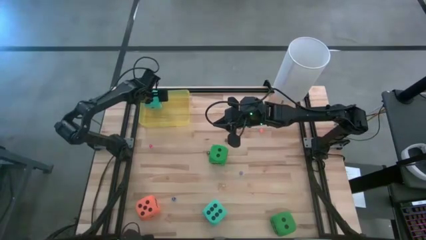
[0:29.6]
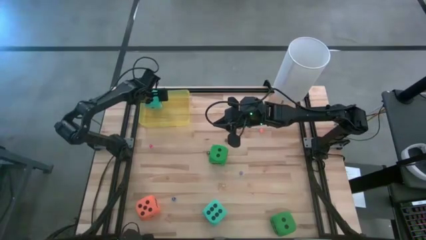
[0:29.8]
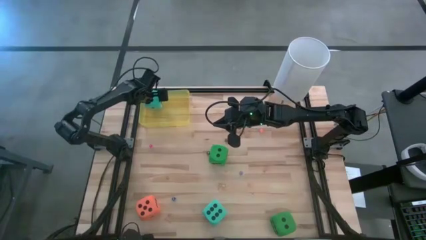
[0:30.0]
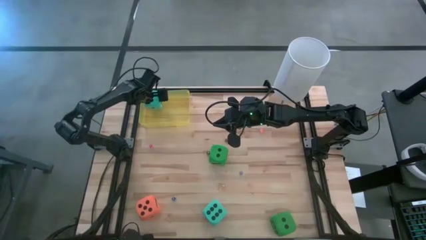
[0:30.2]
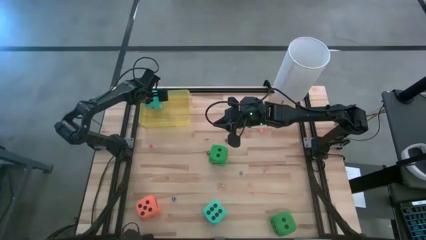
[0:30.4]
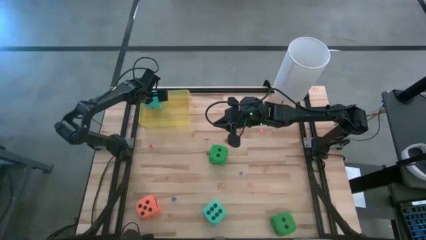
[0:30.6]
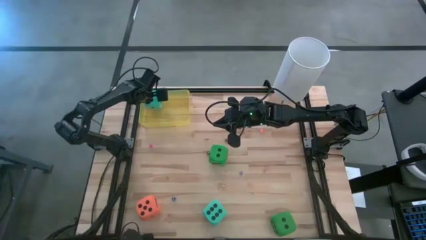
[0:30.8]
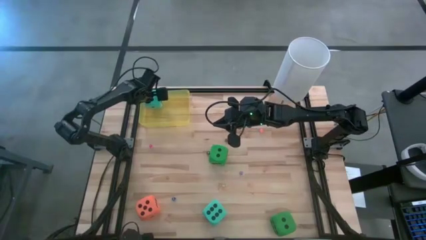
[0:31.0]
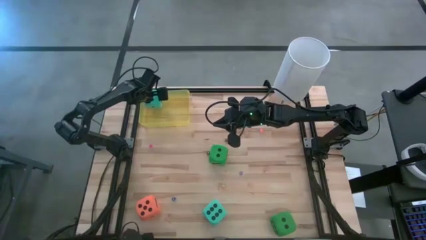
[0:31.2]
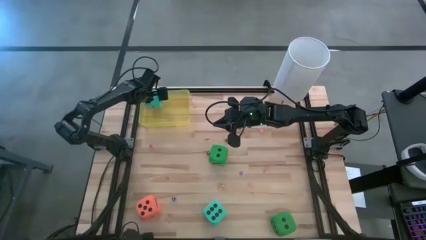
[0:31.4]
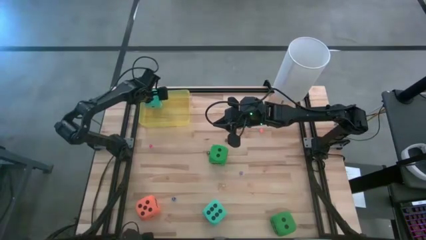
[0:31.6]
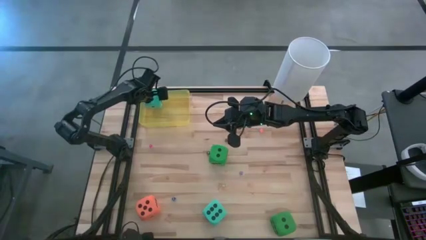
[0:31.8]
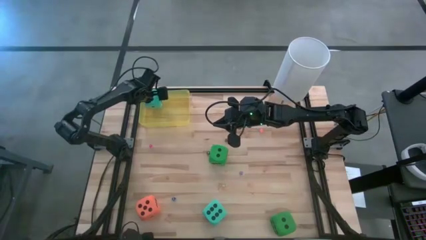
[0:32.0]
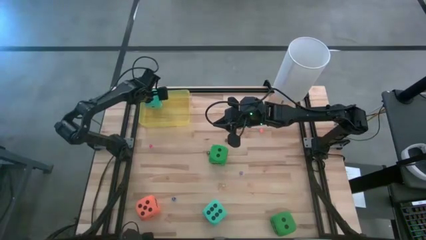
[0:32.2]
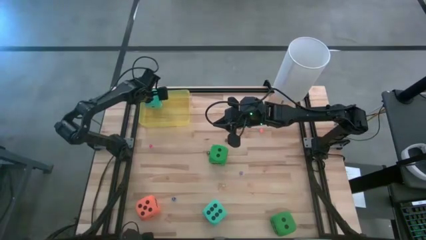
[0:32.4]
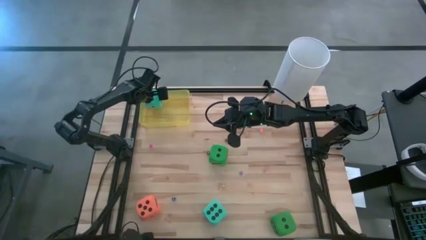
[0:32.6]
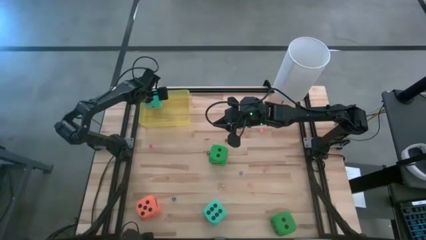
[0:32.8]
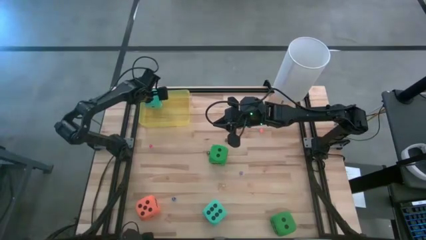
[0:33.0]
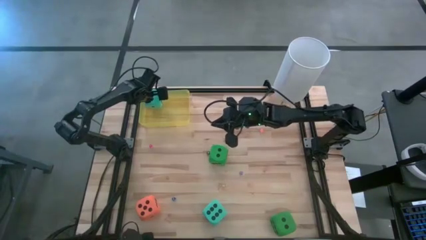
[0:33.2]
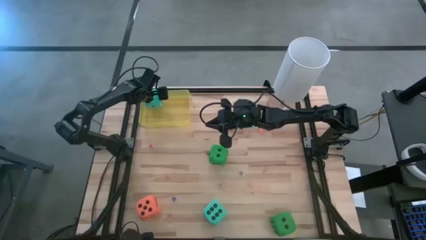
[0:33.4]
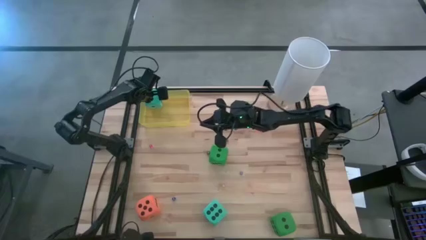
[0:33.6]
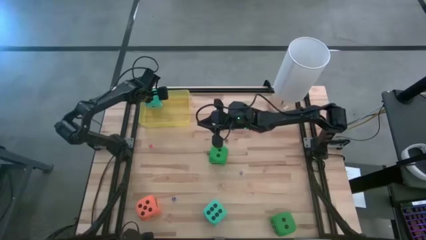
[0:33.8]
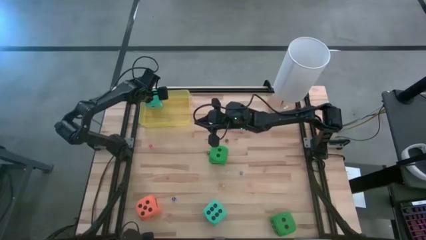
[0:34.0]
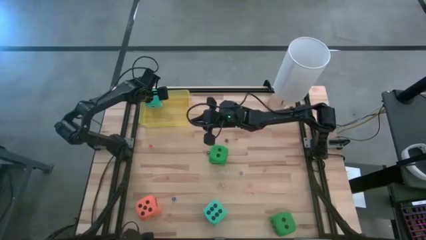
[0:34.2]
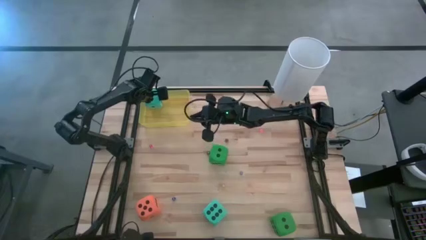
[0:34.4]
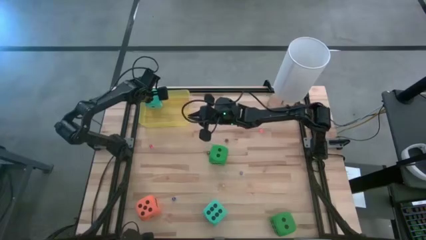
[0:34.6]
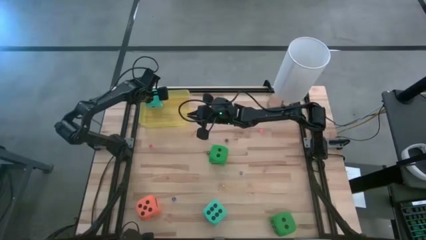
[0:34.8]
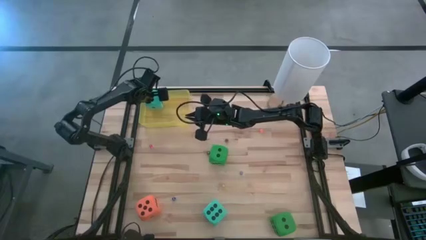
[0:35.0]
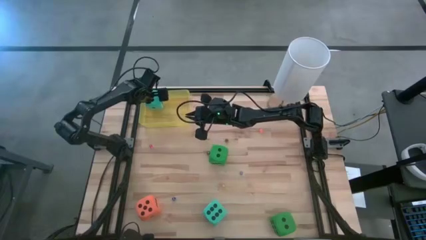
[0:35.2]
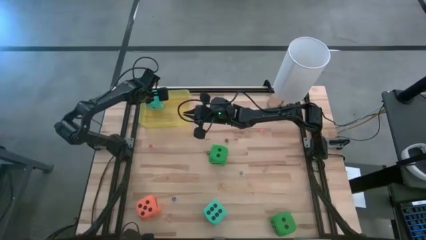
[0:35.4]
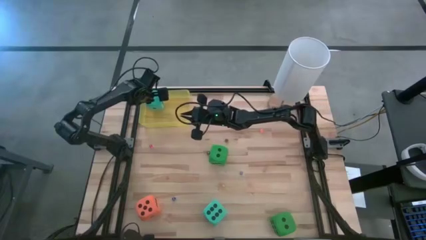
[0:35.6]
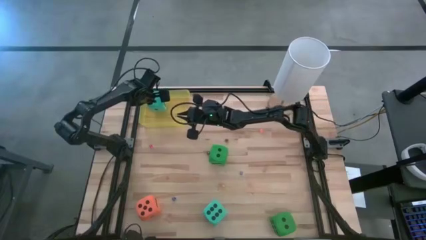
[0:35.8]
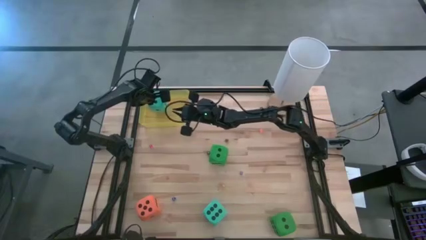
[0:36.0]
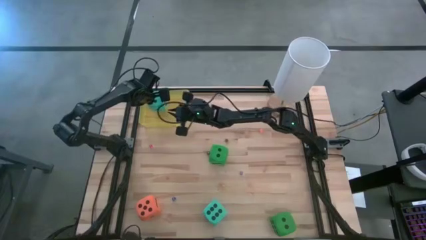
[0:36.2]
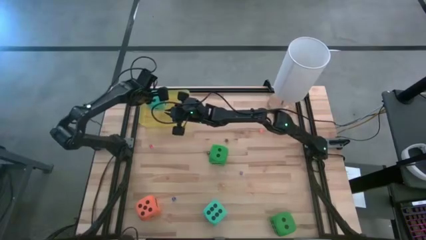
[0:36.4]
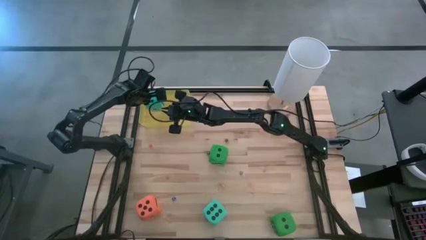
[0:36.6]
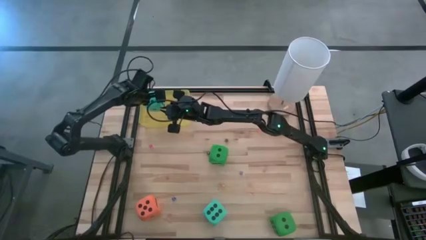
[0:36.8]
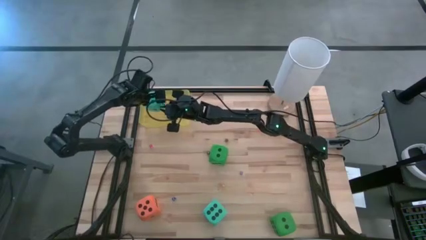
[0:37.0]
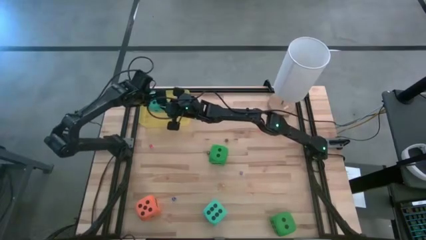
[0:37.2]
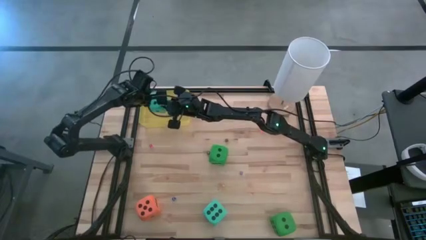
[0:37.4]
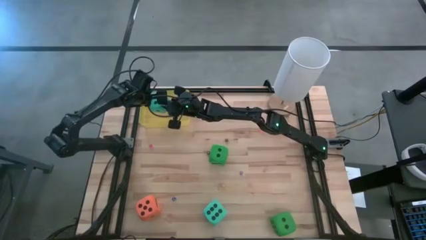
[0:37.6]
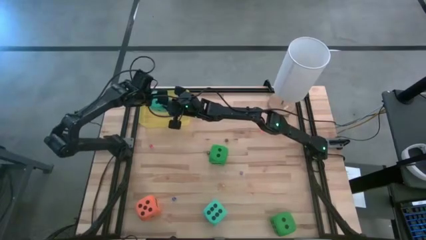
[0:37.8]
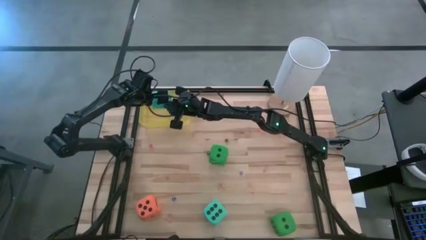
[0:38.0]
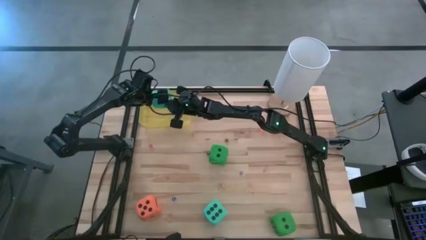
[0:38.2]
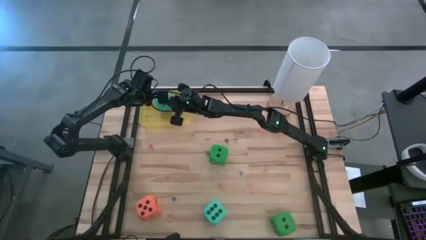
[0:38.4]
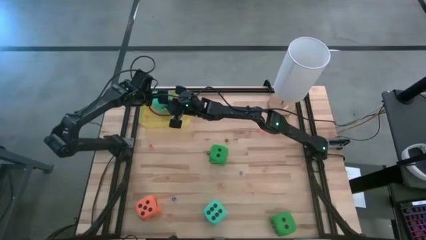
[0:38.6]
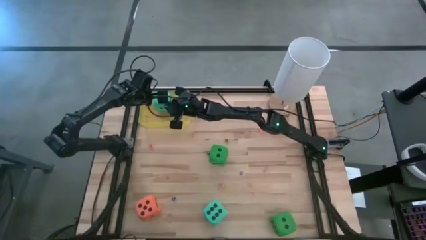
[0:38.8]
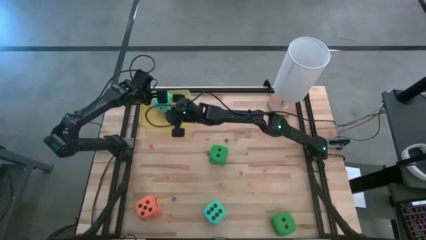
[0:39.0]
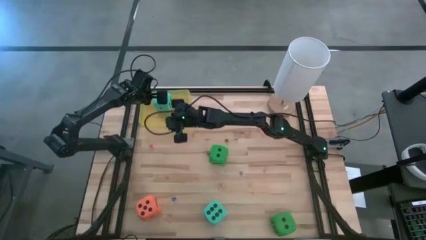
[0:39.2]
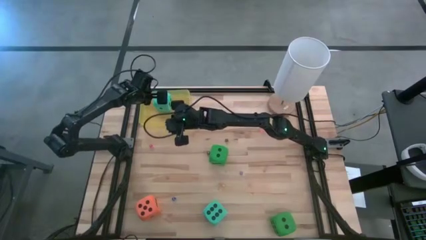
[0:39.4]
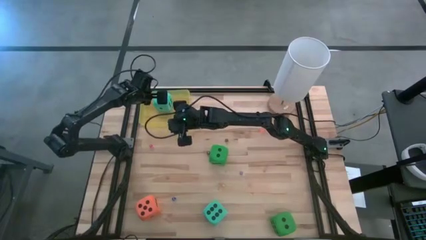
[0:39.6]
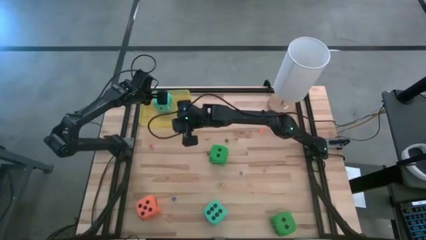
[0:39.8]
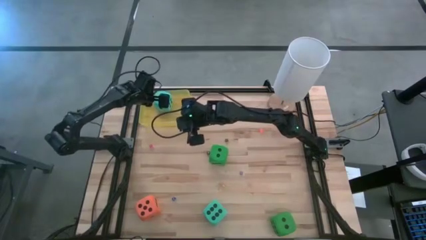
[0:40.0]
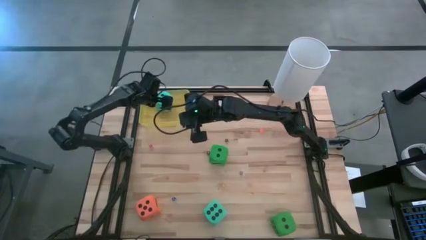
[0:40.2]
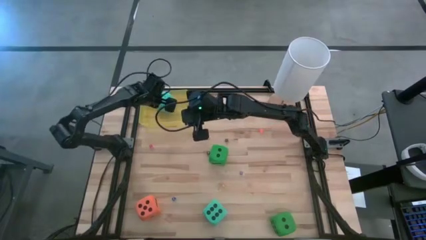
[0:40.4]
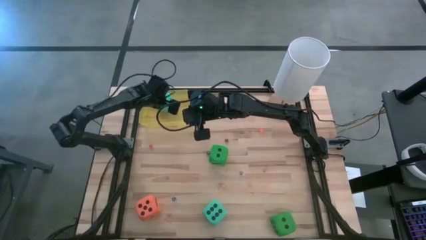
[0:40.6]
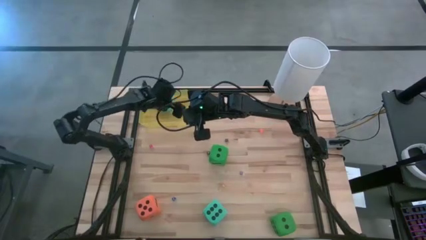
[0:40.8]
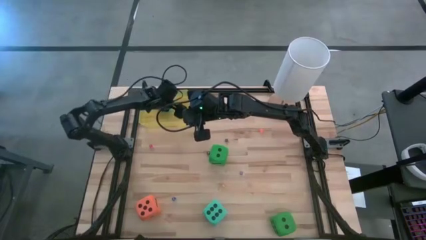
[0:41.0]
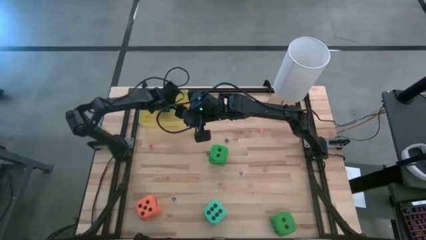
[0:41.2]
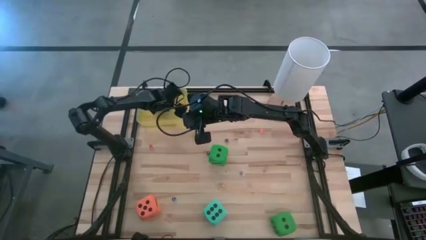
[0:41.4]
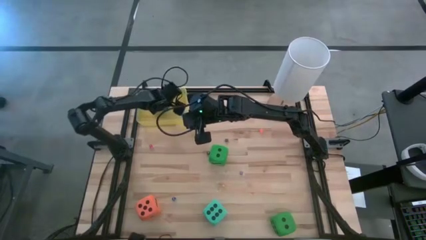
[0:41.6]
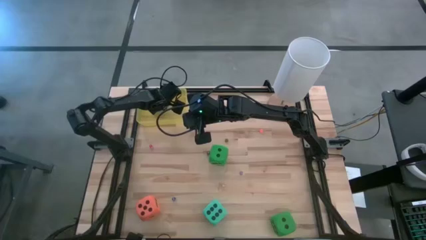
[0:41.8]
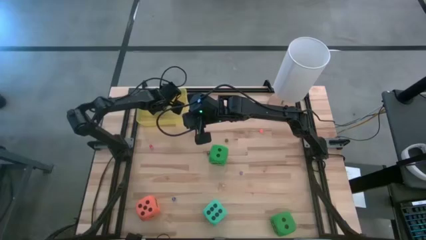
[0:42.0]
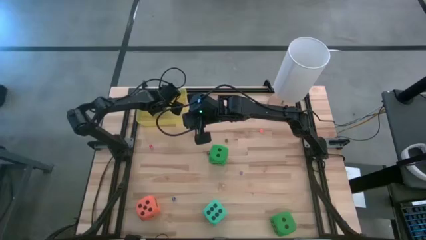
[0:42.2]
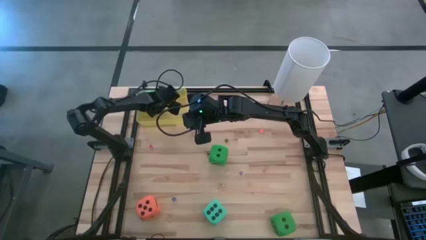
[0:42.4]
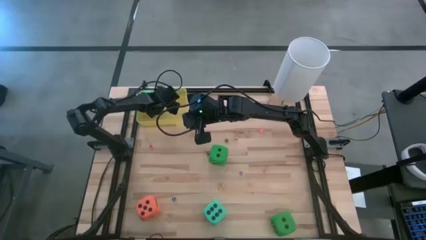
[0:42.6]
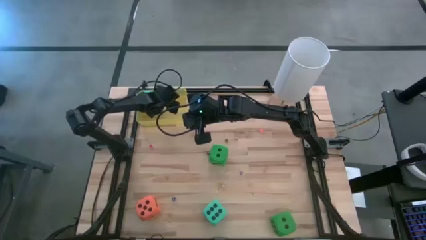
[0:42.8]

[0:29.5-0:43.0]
Task: Pick & Place Dice
Put the top blue large die into the yellow container
